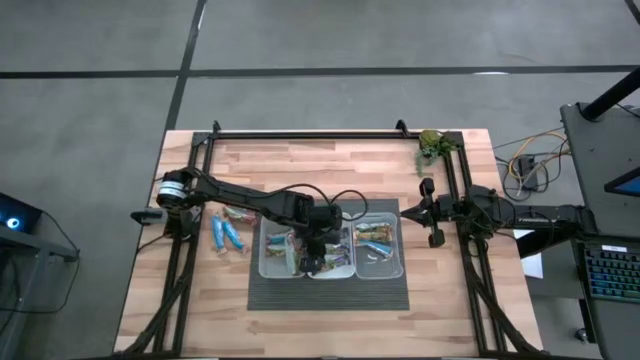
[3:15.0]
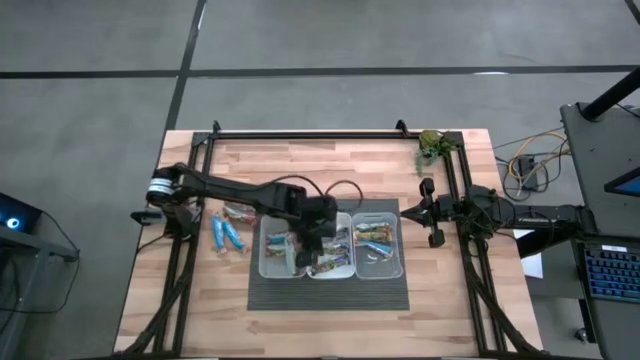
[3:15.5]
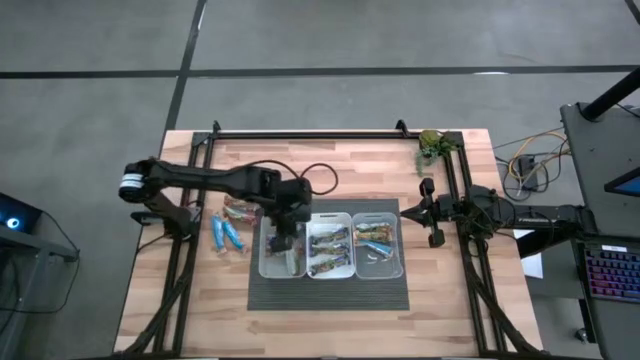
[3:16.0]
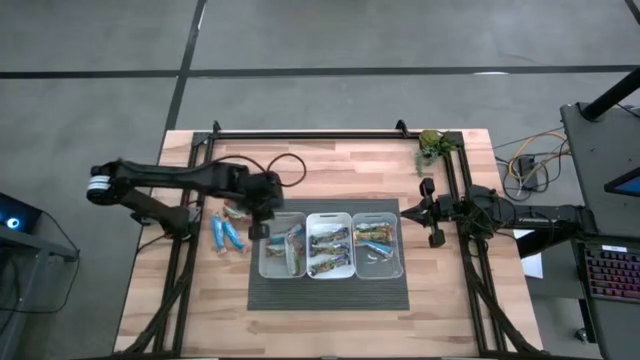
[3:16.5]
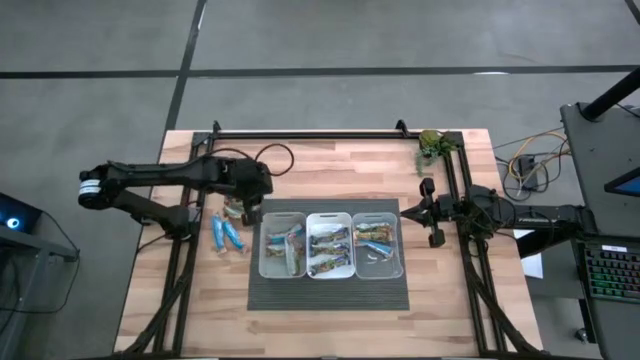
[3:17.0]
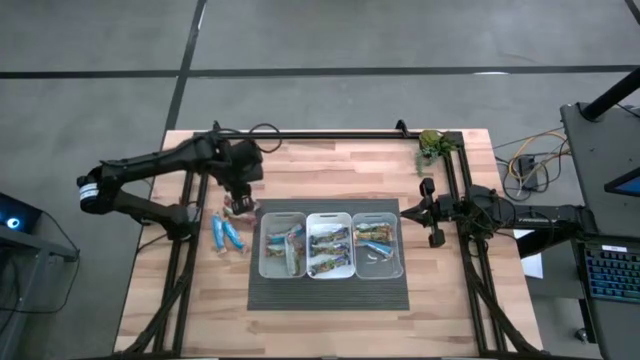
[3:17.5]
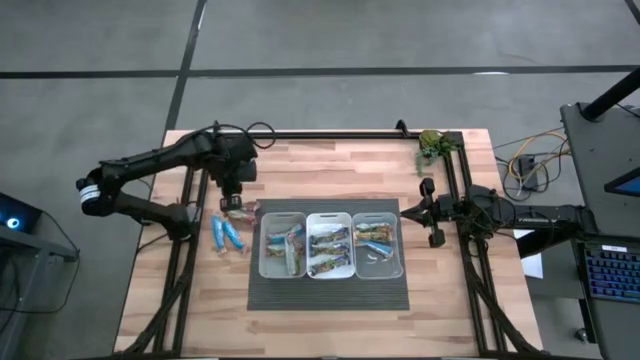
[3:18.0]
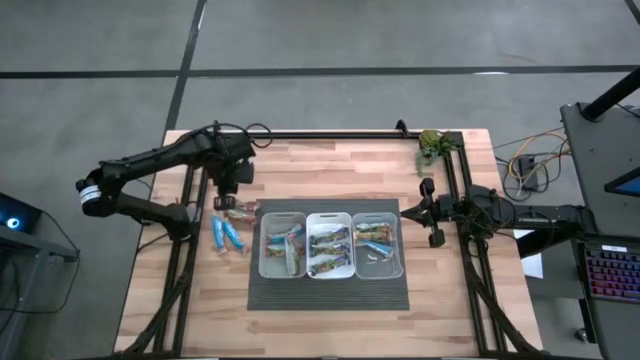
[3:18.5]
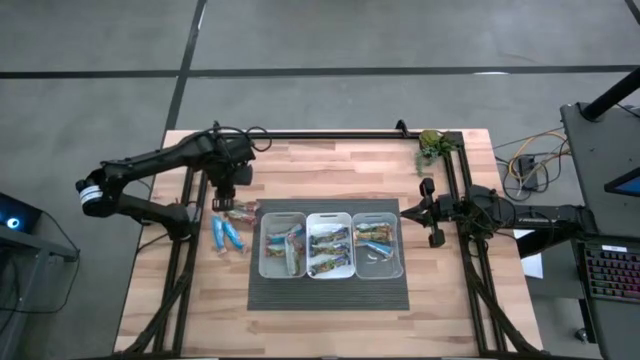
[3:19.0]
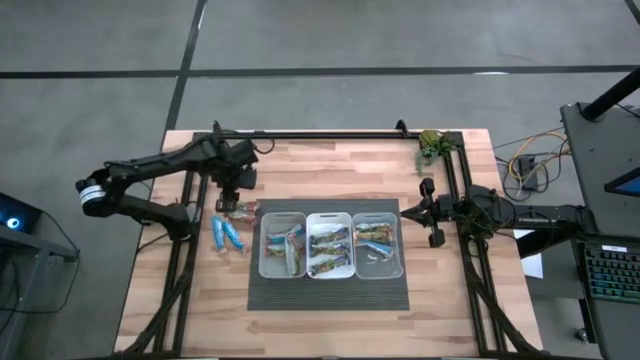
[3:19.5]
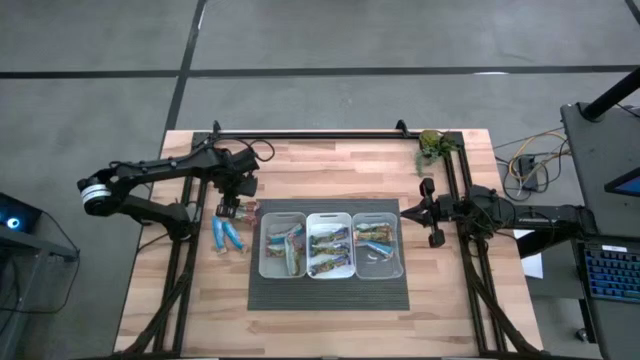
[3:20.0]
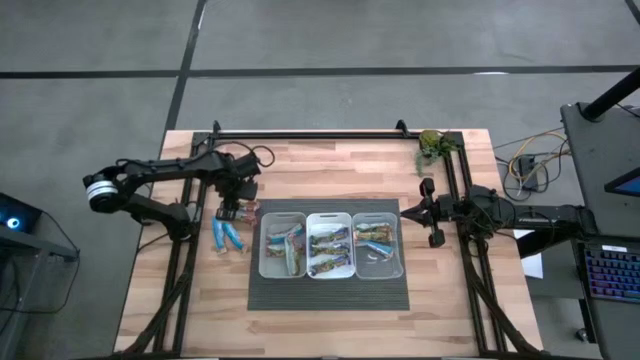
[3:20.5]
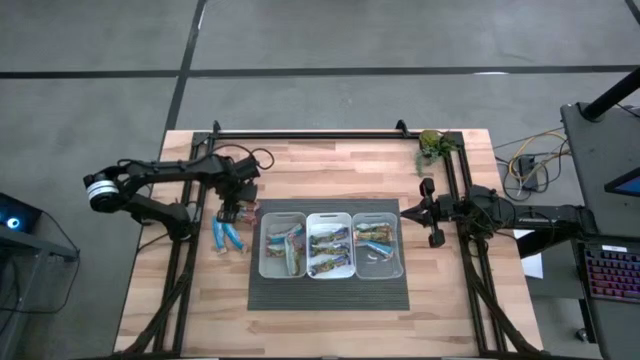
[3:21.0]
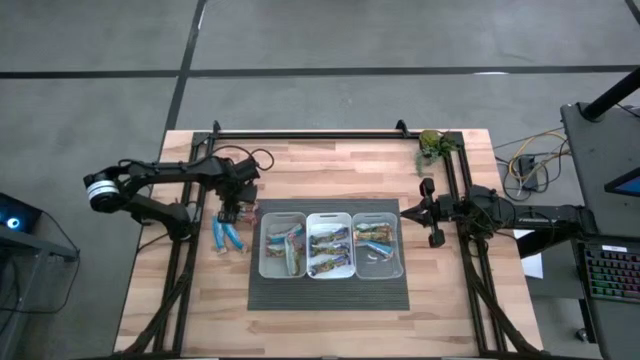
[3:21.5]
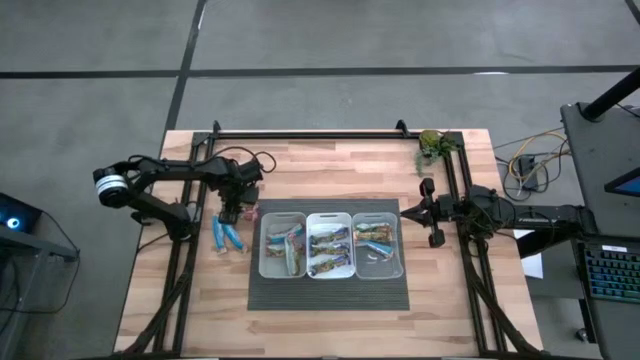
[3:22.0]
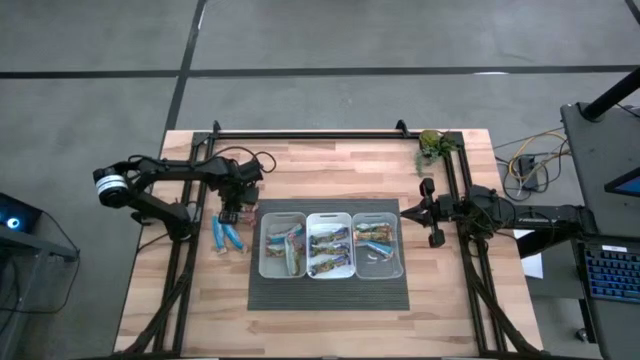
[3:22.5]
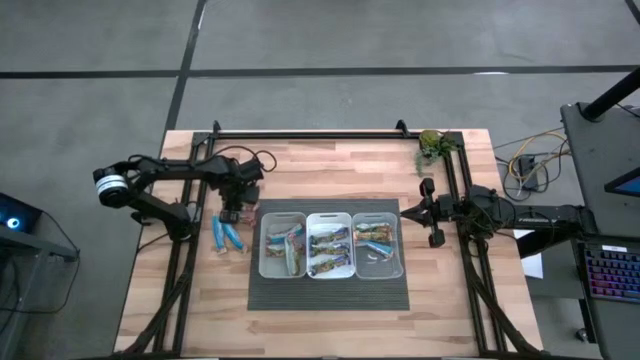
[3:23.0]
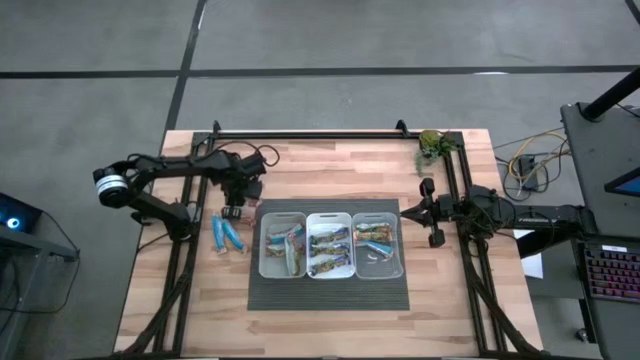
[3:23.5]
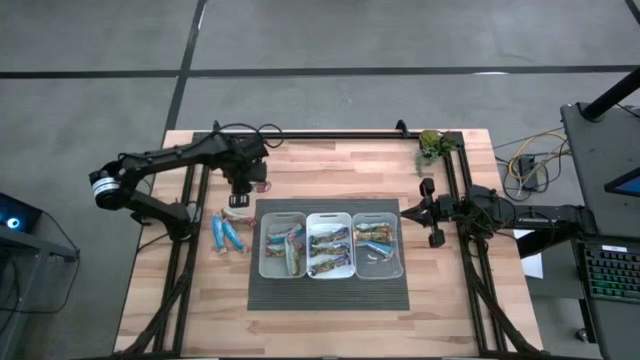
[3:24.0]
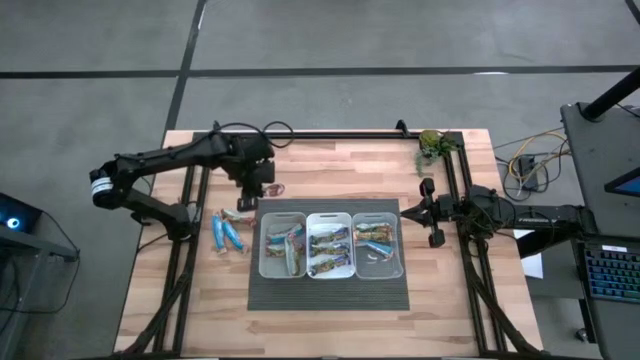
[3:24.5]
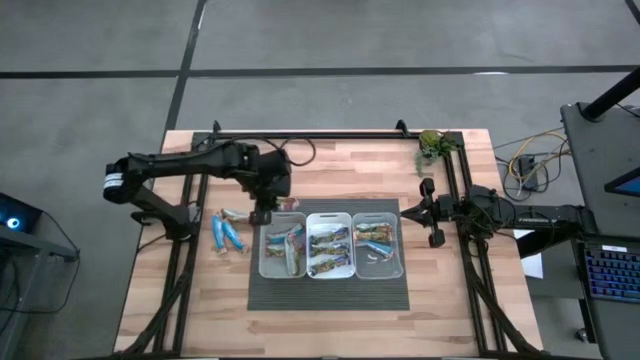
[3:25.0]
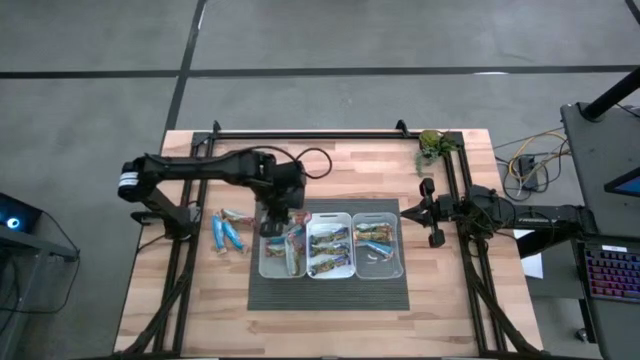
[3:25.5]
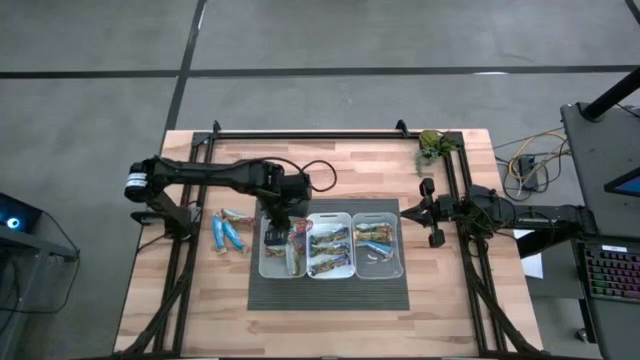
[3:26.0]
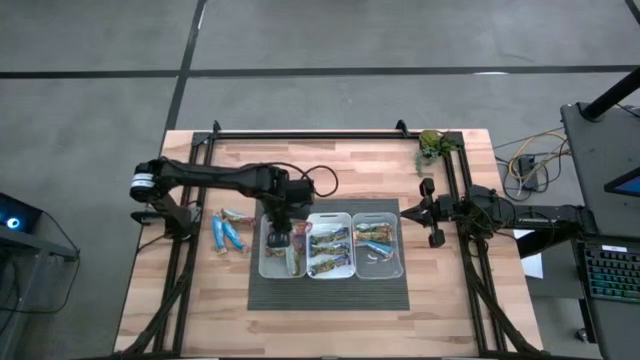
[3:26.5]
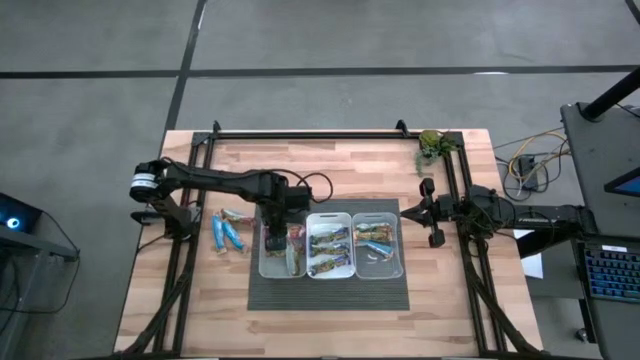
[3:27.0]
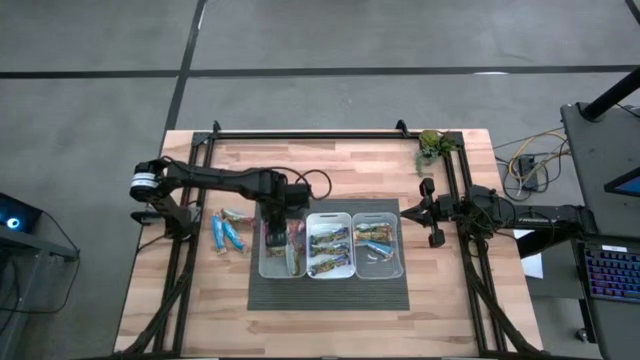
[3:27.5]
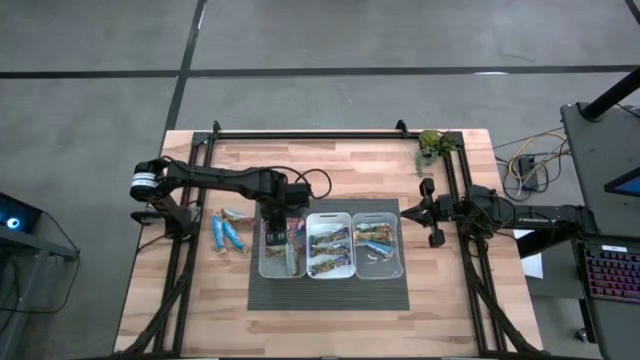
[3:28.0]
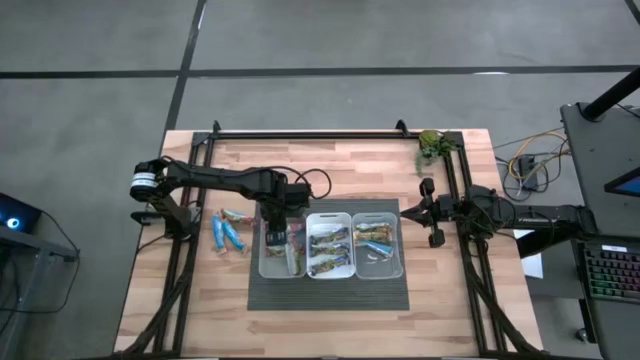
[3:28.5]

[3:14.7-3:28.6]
Task: Pick and place Granola Bars by type
Put the top red granola bar into the gray bin

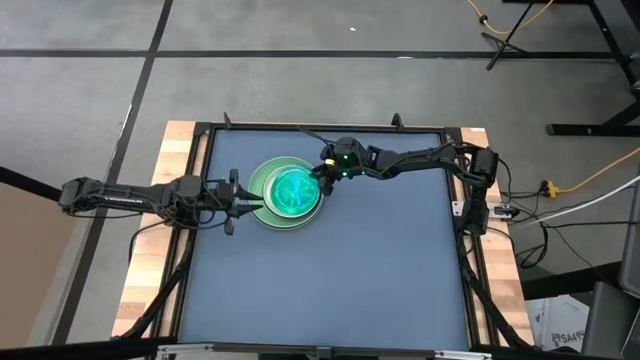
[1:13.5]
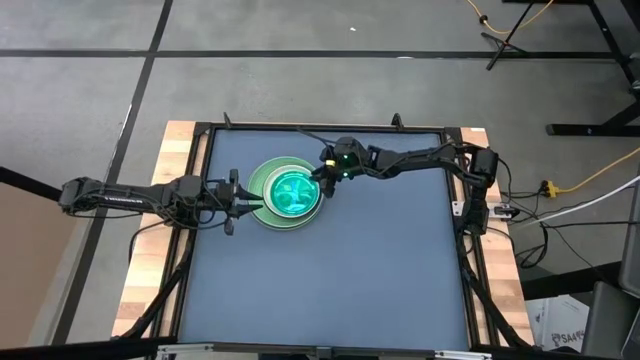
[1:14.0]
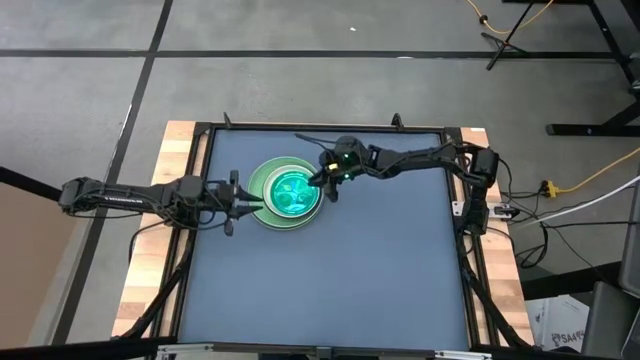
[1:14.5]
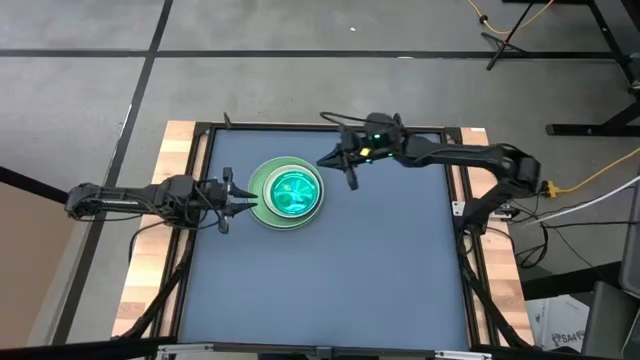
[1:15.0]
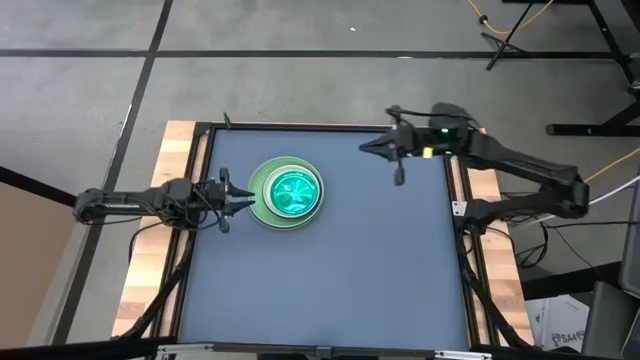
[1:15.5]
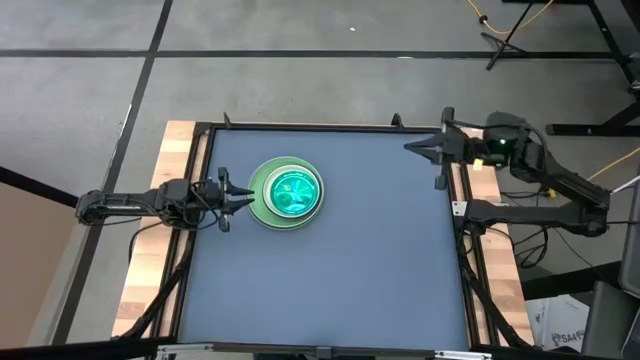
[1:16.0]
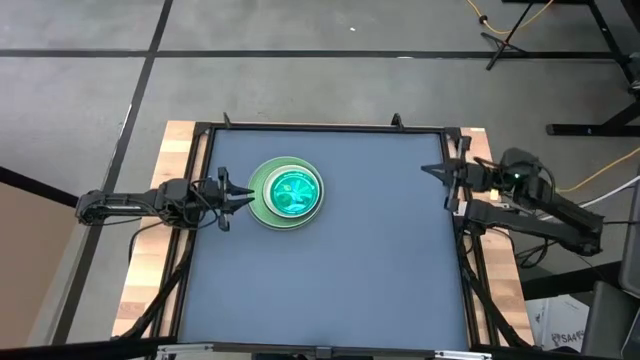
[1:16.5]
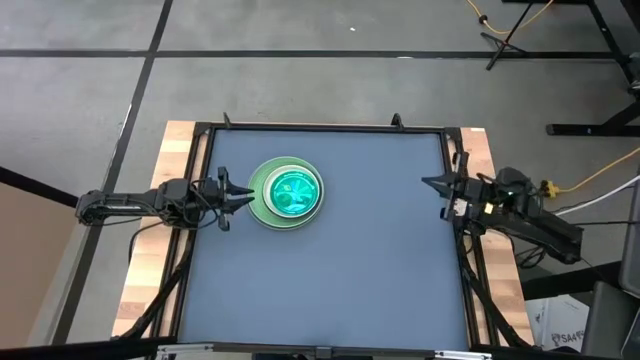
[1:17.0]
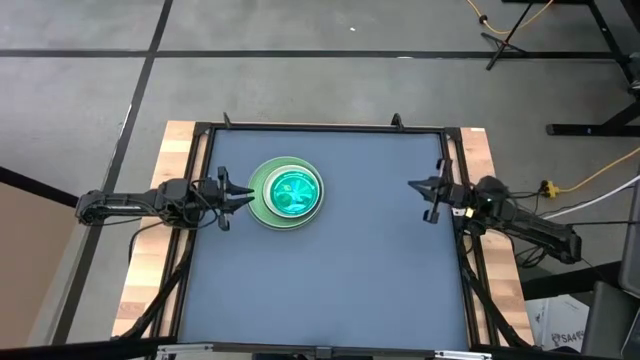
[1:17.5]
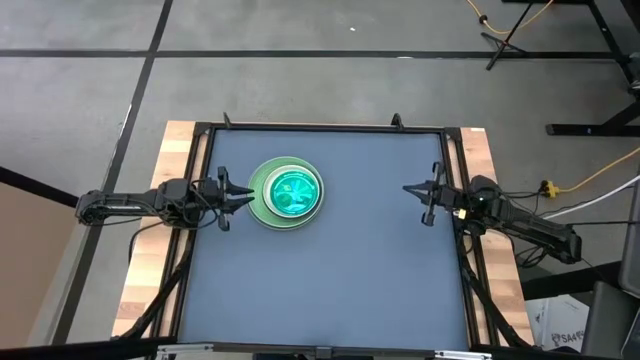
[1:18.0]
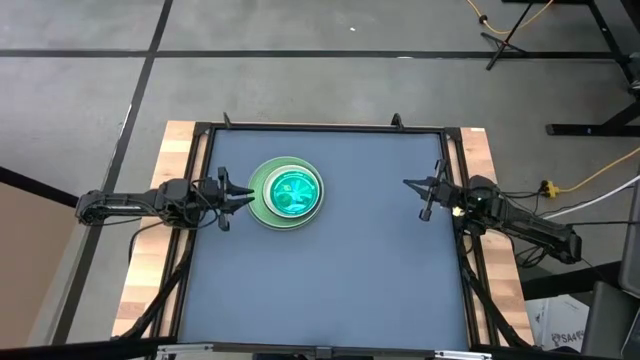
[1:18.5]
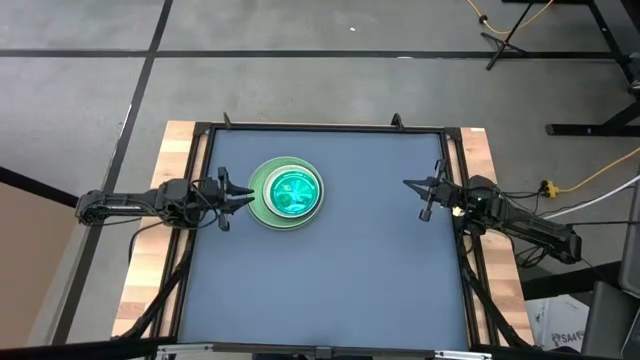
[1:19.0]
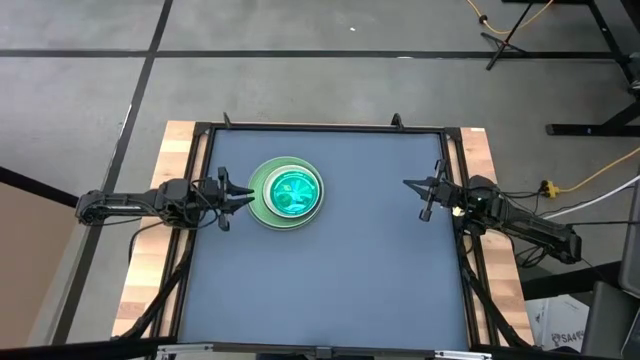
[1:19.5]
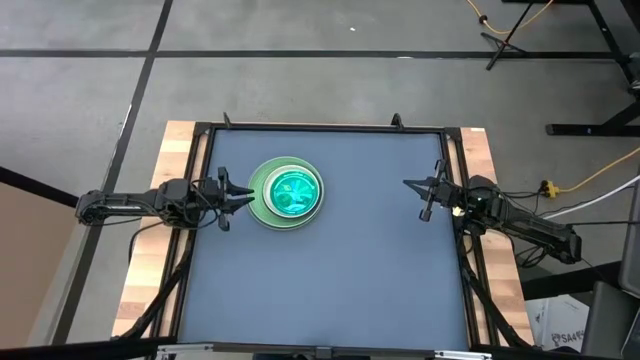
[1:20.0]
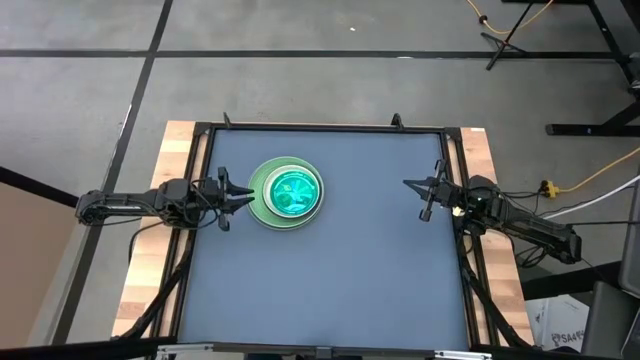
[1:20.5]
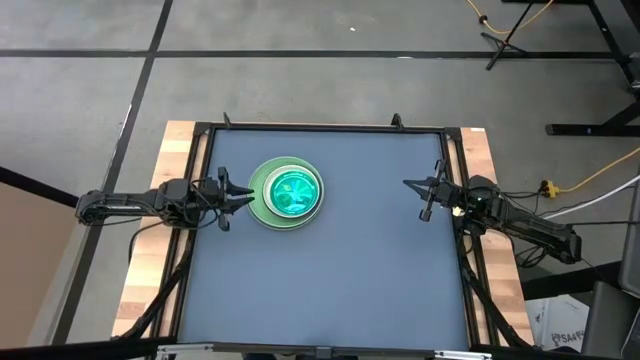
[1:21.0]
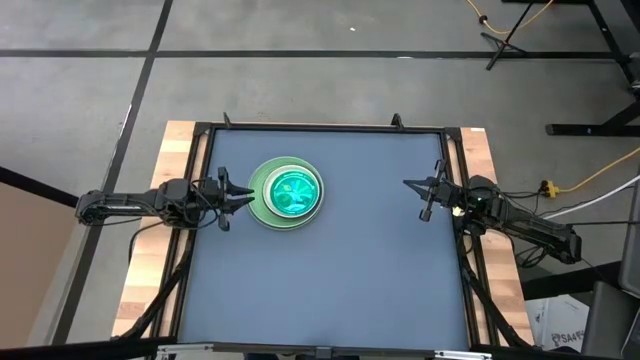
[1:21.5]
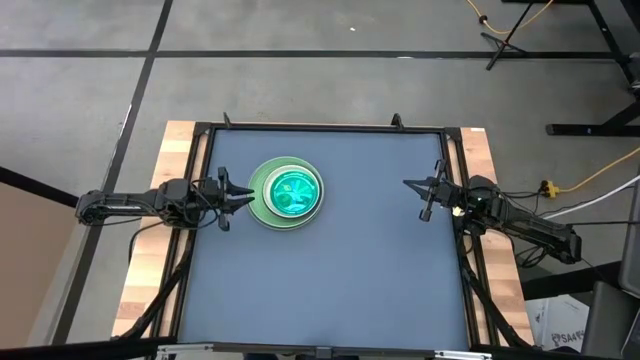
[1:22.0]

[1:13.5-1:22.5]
Task: Stack plastic plates
Return to Home Position
